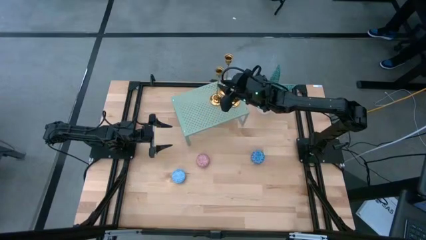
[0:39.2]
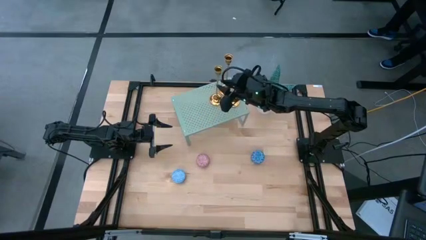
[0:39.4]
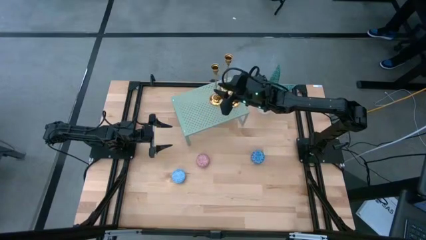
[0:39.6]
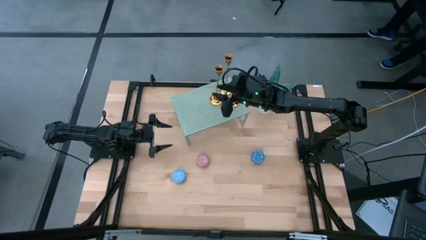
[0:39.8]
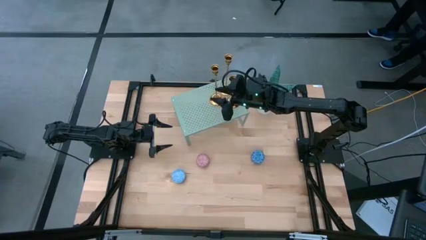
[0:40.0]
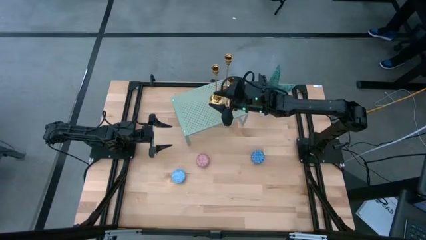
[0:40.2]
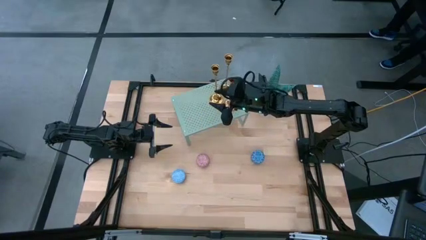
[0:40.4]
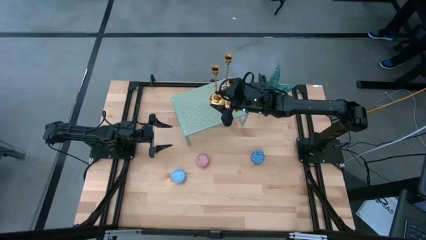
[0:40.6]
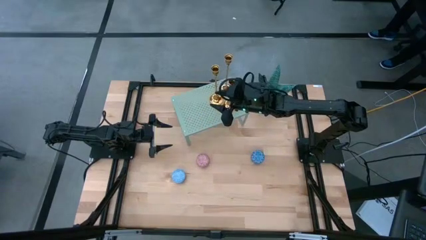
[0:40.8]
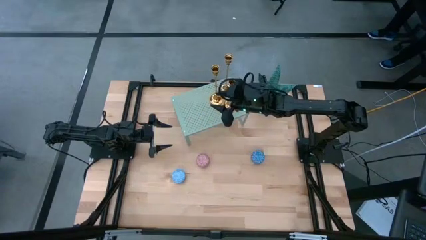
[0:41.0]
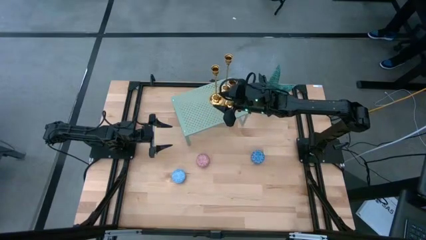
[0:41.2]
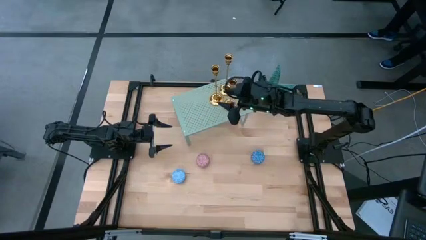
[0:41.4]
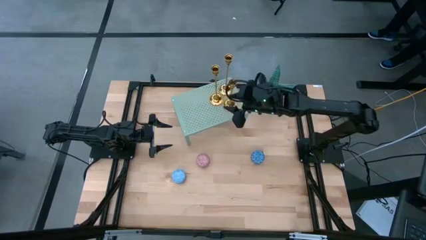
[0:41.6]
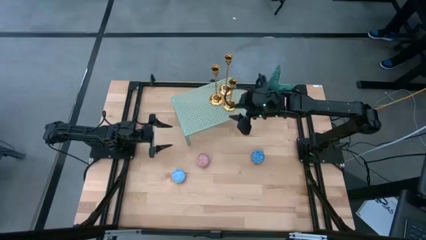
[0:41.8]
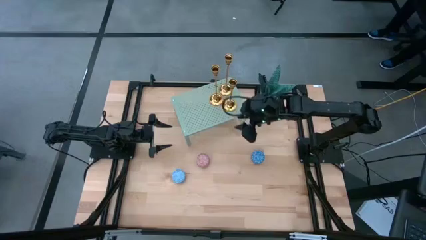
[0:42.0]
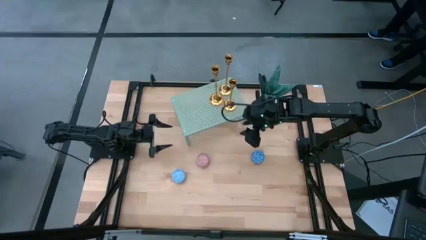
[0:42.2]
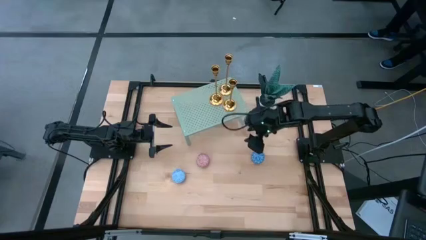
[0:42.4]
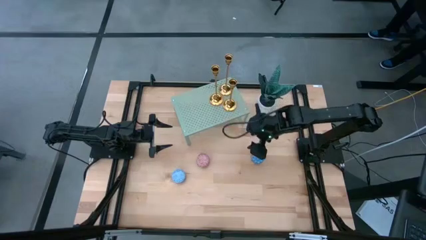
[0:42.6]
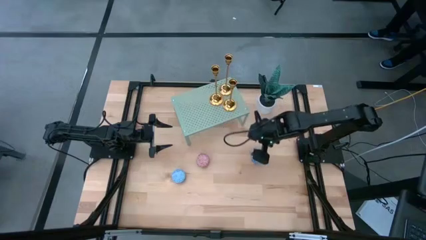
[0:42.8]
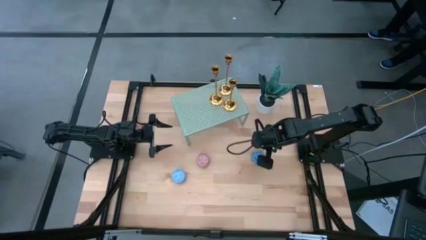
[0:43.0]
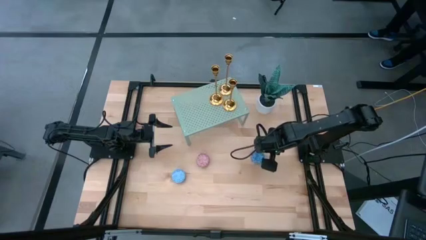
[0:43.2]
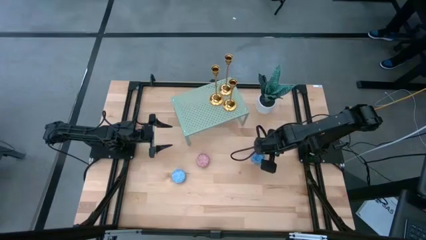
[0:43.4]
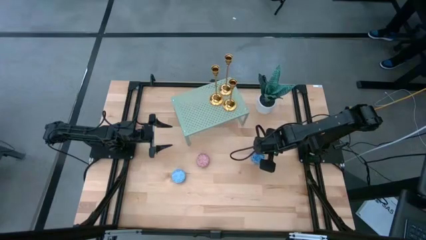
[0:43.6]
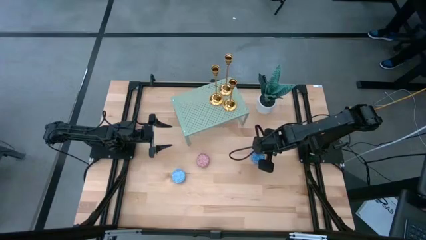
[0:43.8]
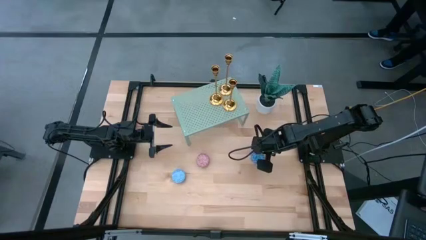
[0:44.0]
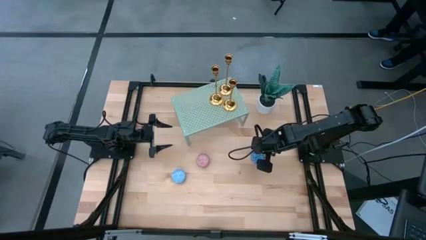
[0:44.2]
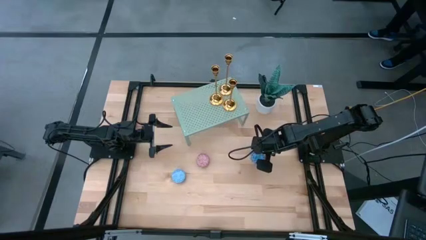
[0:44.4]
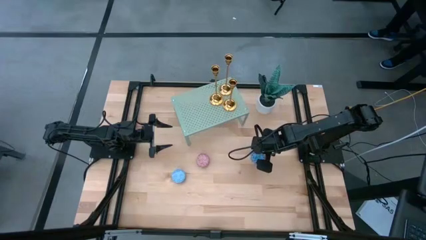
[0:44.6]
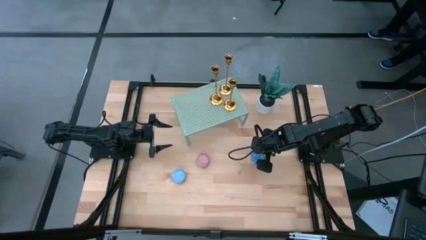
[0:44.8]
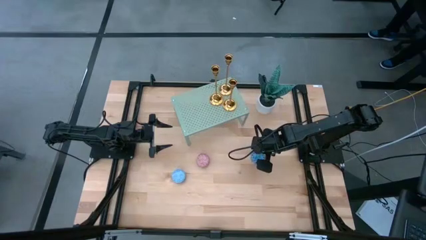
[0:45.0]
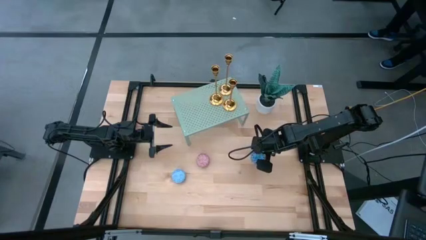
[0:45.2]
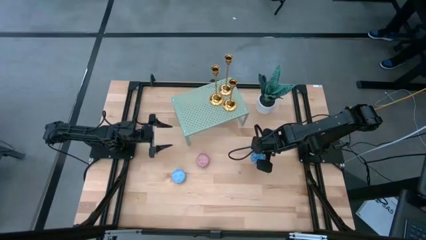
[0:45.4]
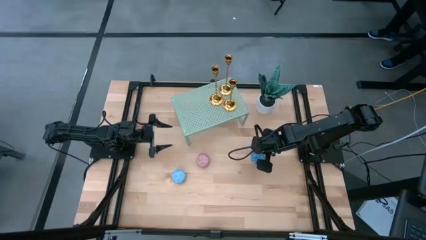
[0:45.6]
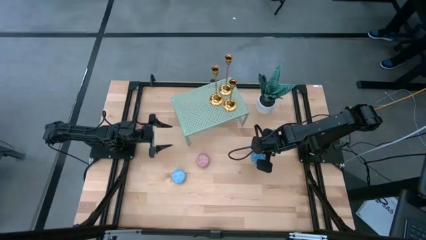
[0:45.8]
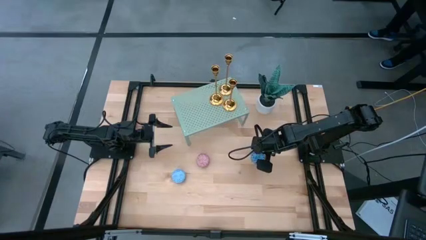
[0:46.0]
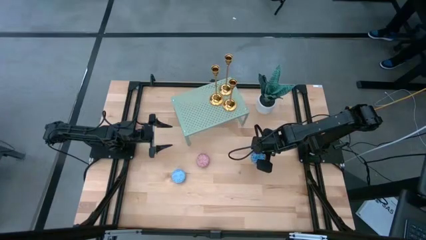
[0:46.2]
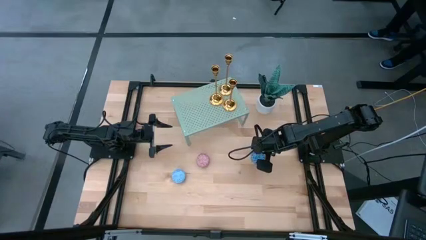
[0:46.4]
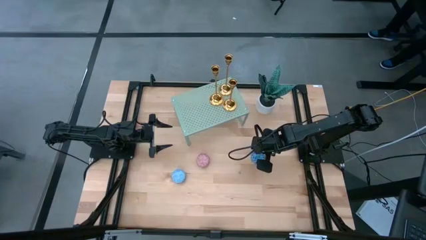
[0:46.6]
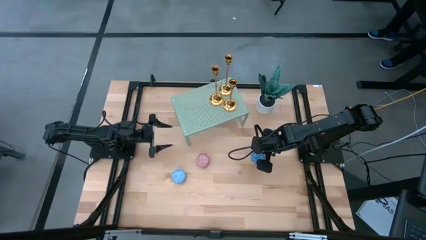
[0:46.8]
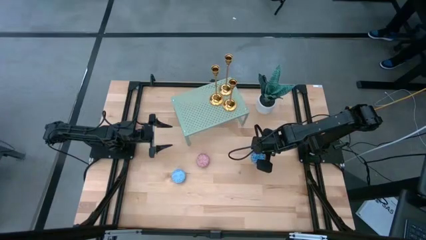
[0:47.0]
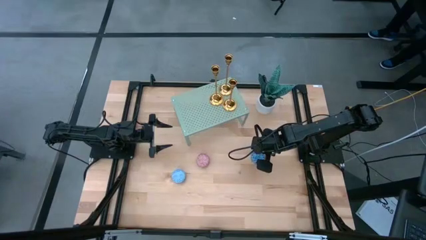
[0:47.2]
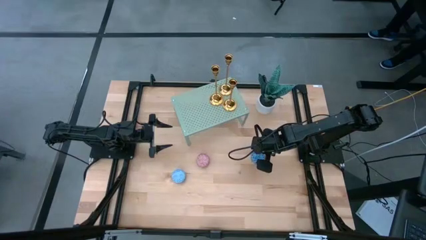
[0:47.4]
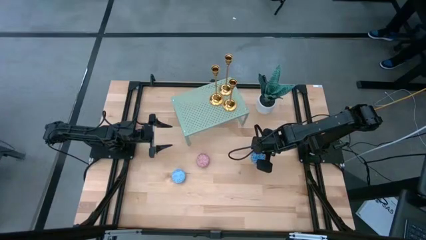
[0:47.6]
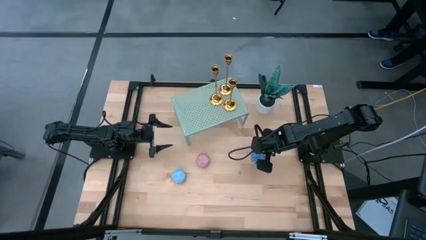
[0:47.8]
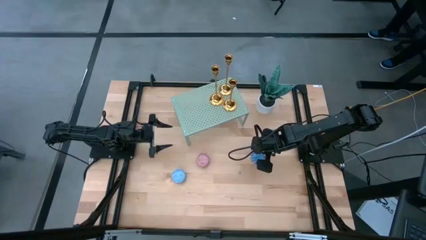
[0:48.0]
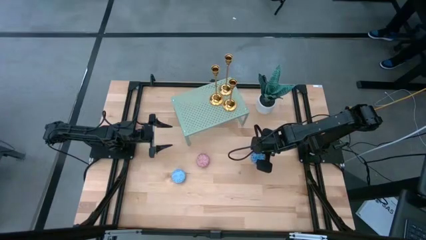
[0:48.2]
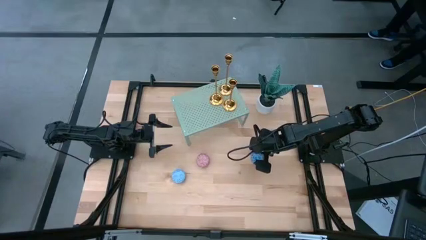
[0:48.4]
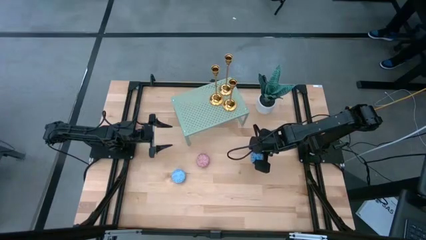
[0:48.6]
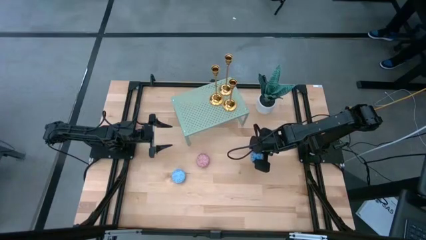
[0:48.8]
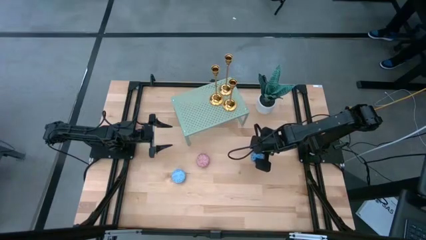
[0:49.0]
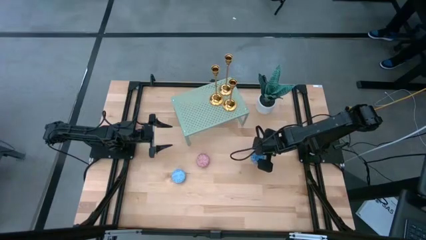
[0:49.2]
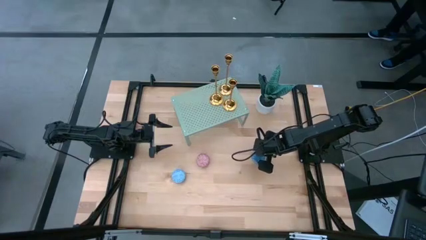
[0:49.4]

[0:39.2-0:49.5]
Task: Pick & Place candle stick holders
Put the blue scented candle on the shelf

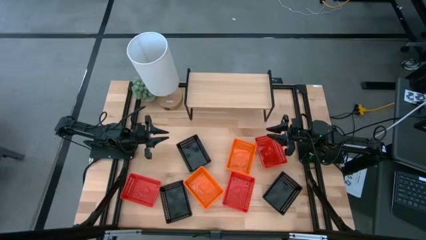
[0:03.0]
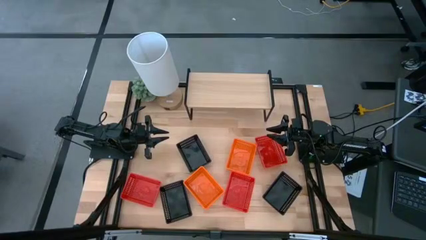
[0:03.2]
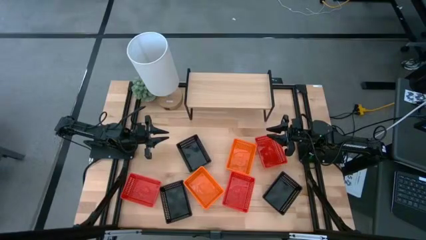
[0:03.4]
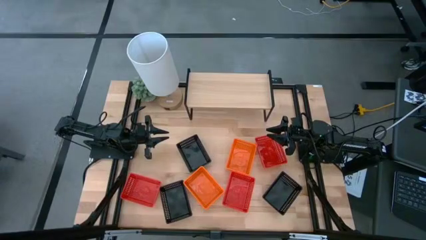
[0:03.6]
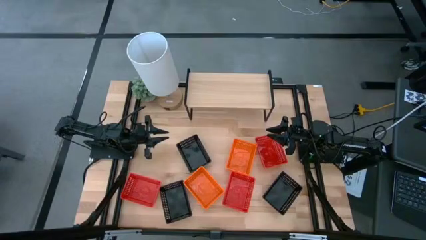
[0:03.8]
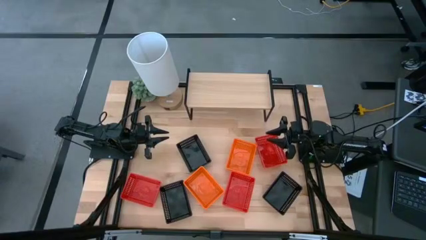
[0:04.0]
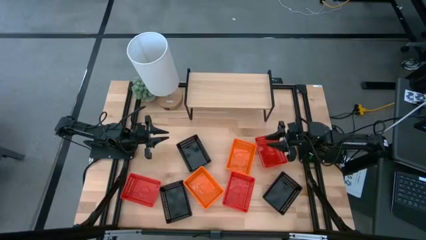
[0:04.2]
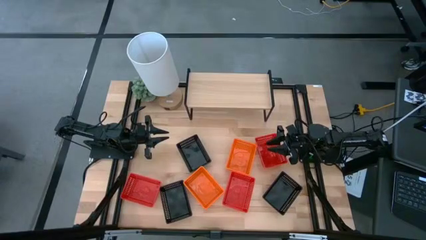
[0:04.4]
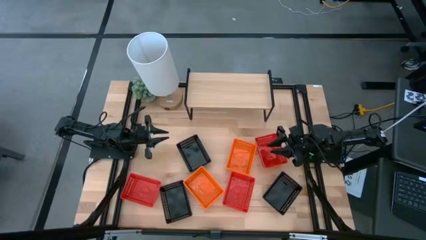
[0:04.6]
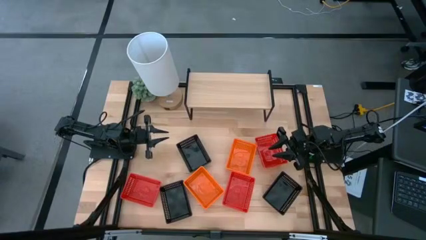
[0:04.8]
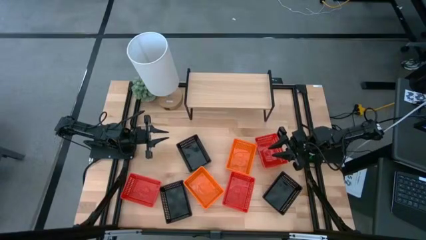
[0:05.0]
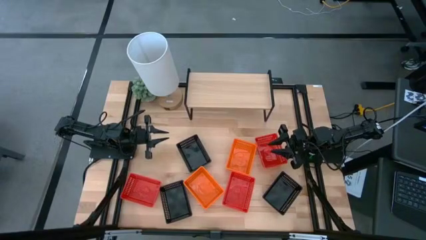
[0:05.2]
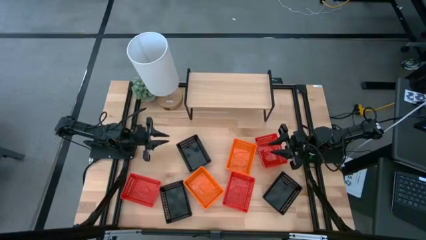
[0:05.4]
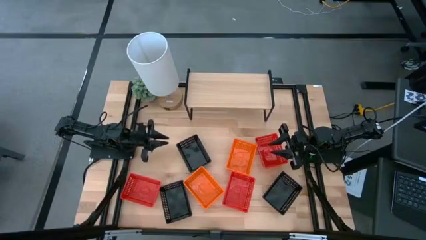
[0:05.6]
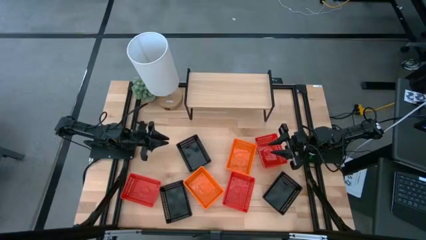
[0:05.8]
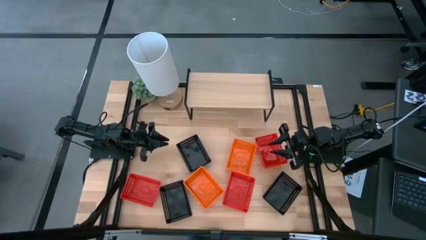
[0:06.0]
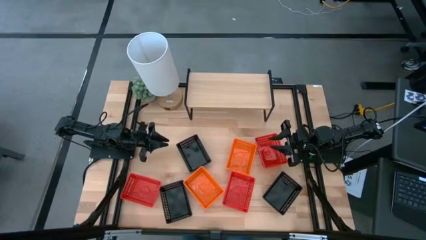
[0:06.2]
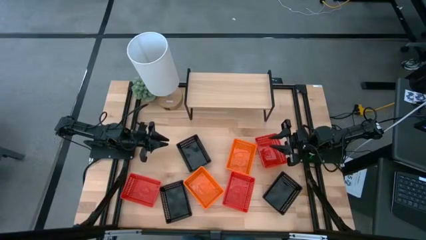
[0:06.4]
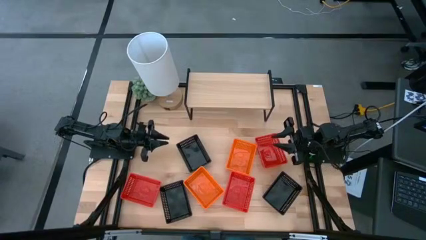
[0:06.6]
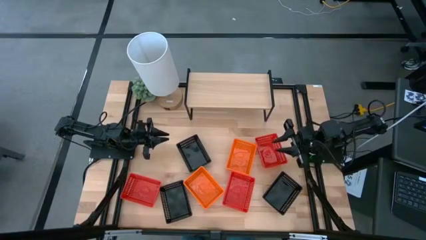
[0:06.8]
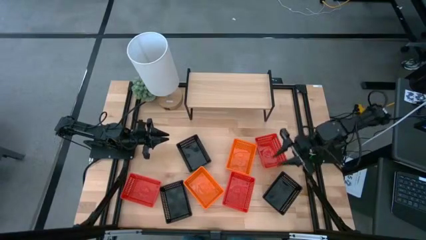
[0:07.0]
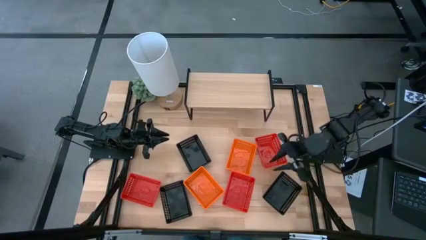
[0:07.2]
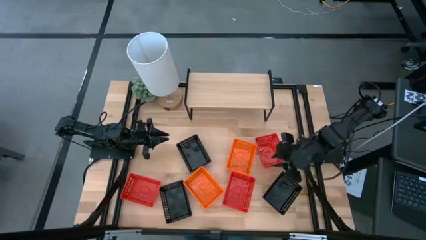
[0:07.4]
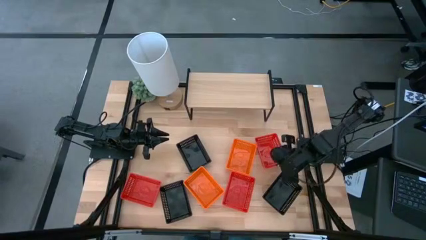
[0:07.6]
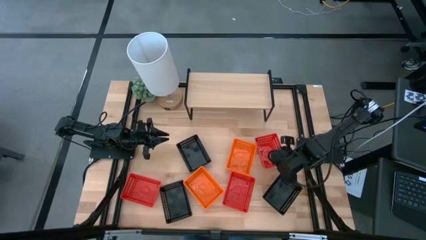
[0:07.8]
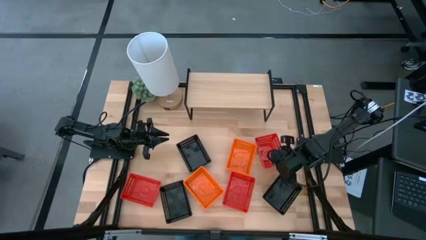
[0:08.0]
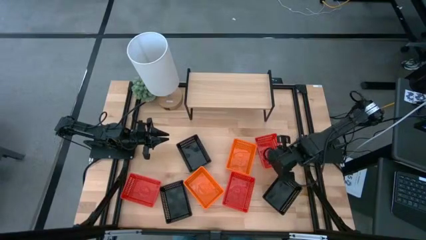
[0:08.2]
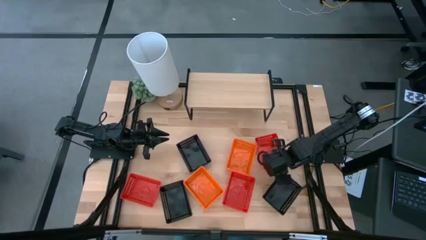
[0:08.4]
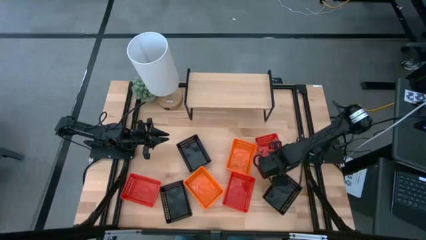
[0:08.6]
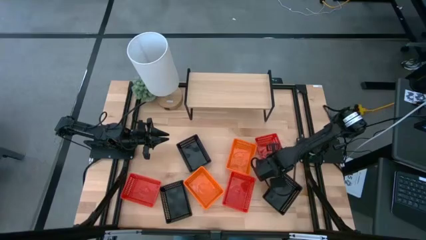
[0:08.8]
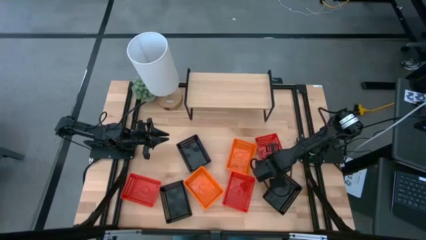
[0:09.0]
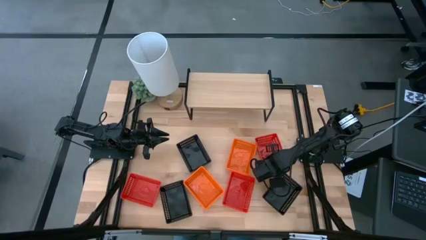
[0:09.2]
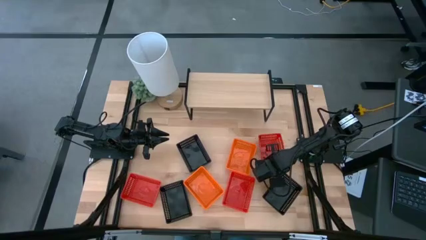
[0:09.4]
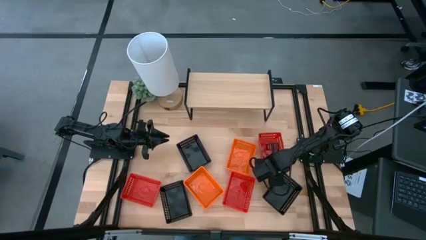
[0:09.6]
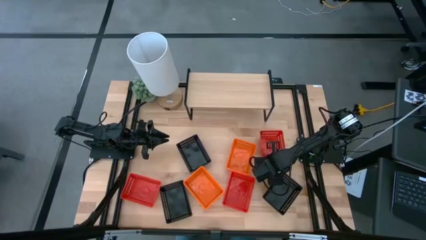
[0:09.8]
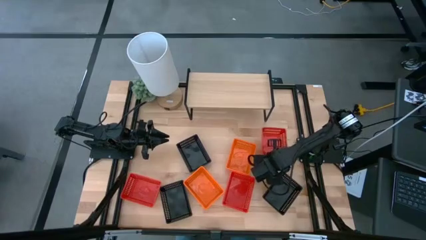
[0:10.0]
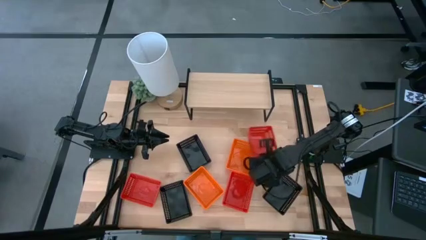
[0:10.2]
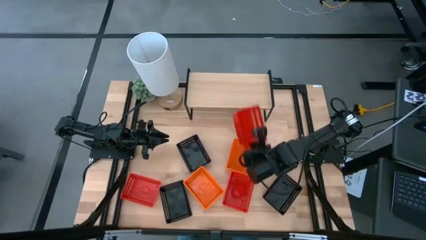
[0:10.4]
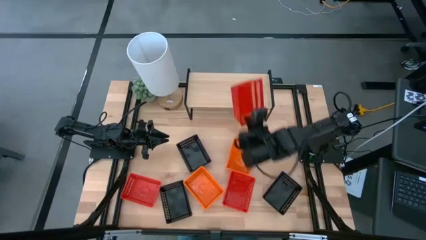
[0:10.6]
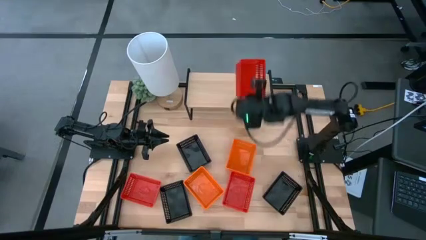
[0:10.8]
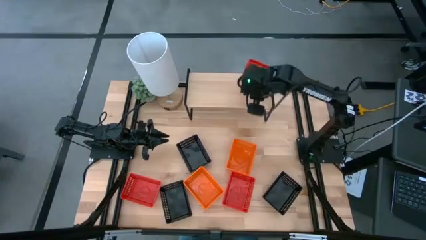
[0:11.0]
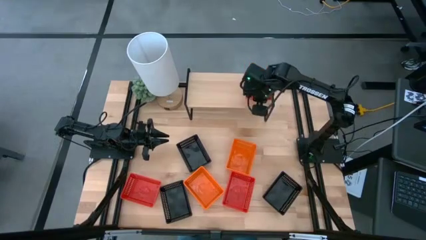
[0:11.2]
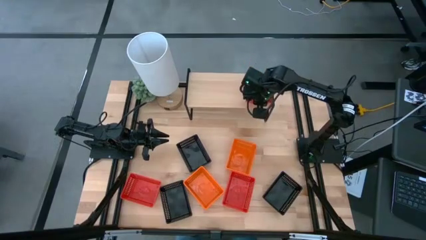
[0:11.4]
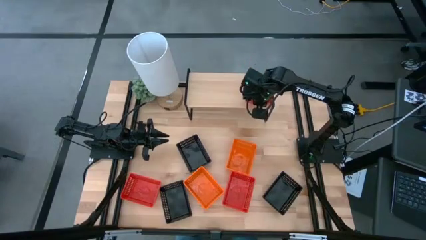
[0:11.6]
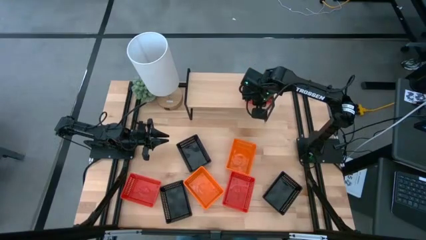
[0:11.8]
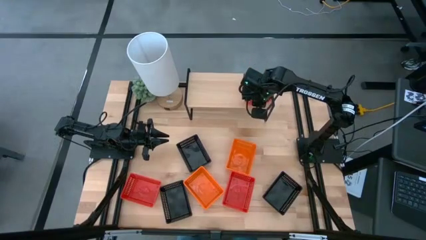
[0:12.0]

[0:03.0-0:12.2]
Task: Stack baskets on shelf by color
Put the top red bin on the shelf
